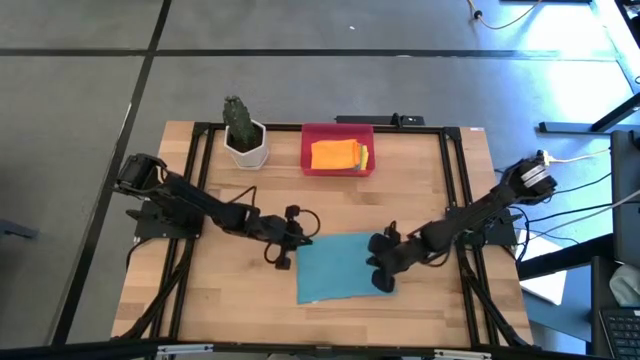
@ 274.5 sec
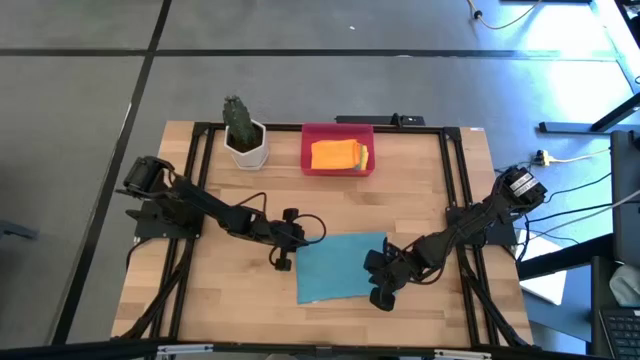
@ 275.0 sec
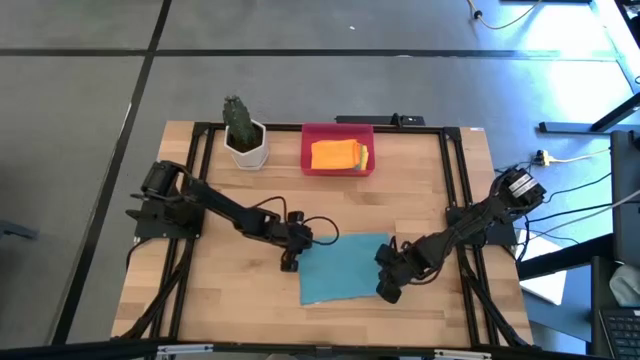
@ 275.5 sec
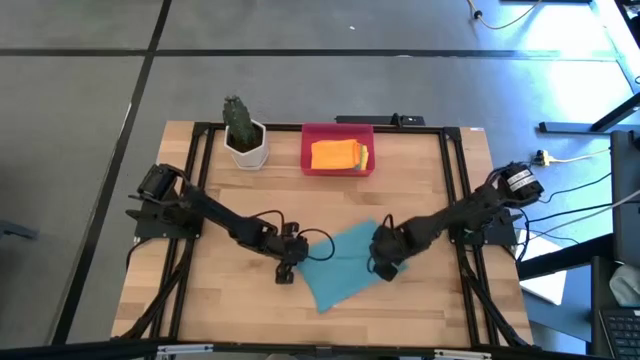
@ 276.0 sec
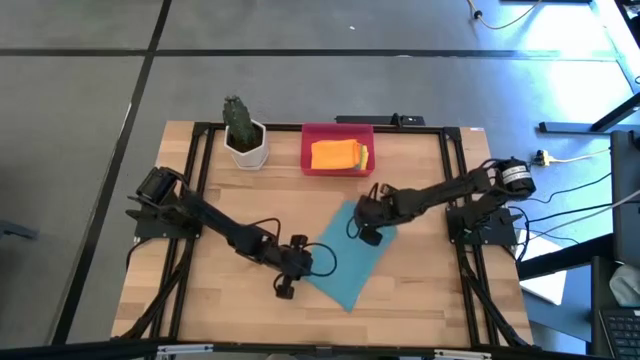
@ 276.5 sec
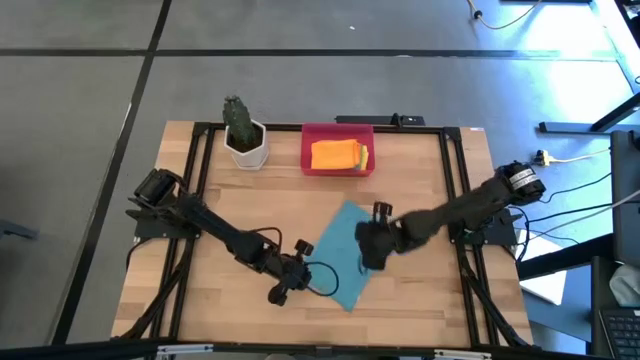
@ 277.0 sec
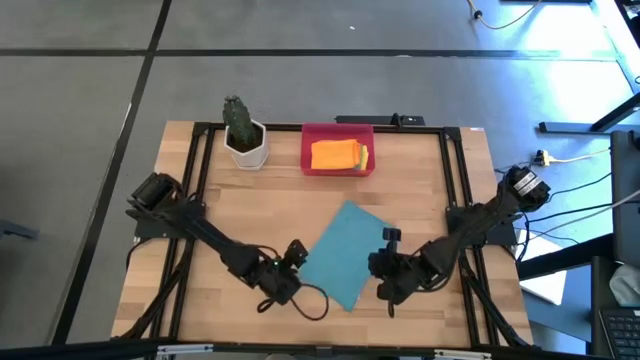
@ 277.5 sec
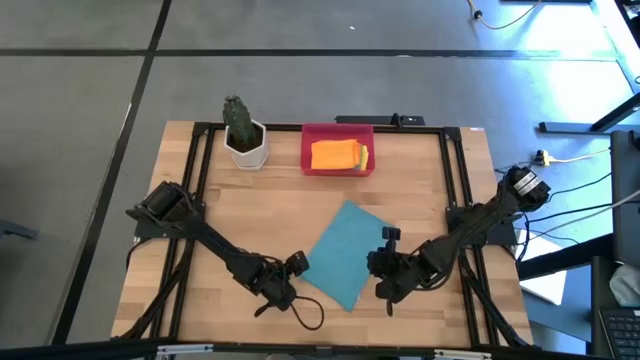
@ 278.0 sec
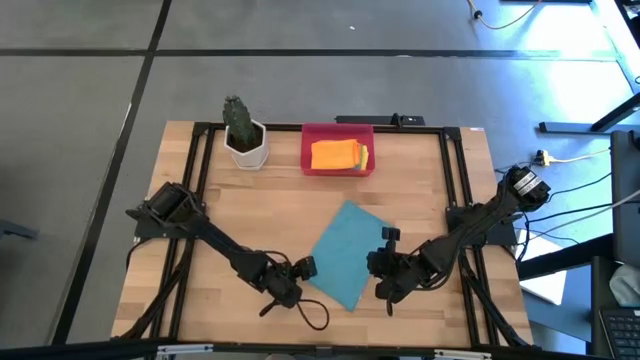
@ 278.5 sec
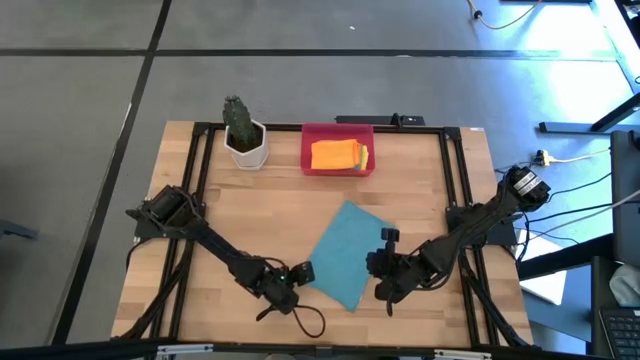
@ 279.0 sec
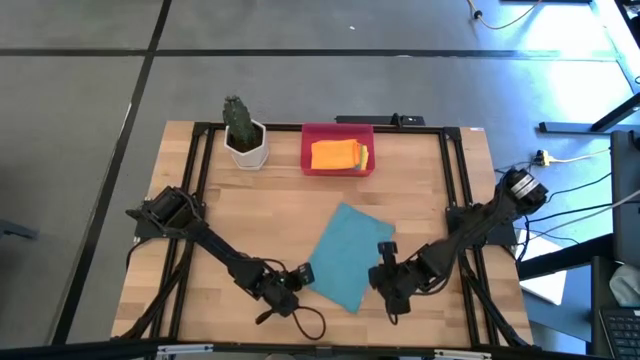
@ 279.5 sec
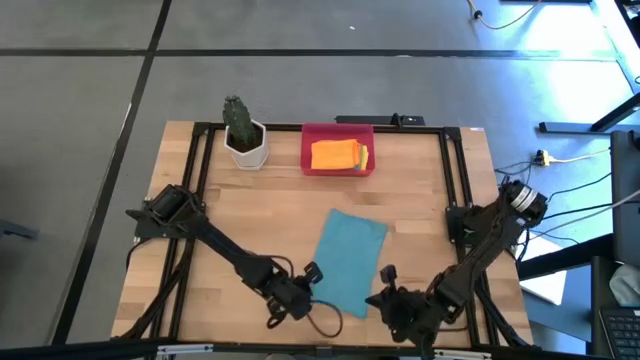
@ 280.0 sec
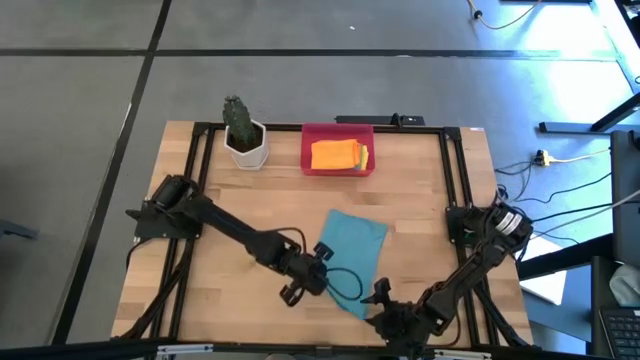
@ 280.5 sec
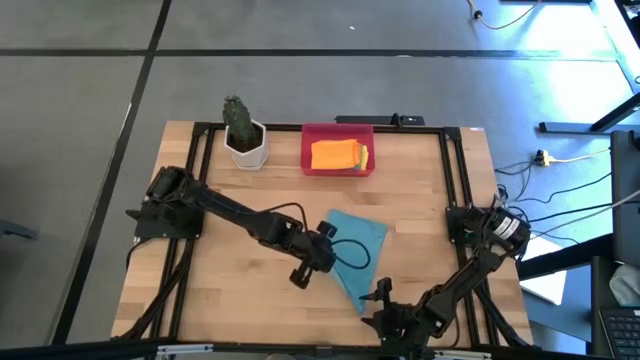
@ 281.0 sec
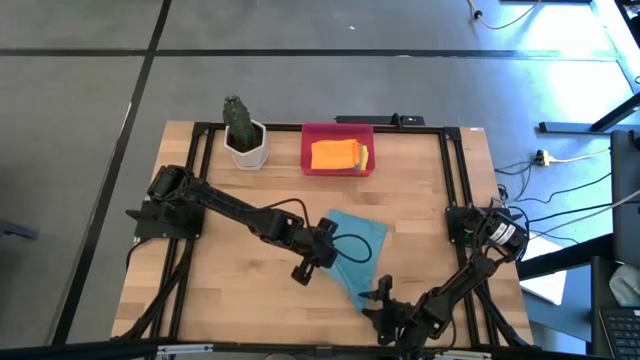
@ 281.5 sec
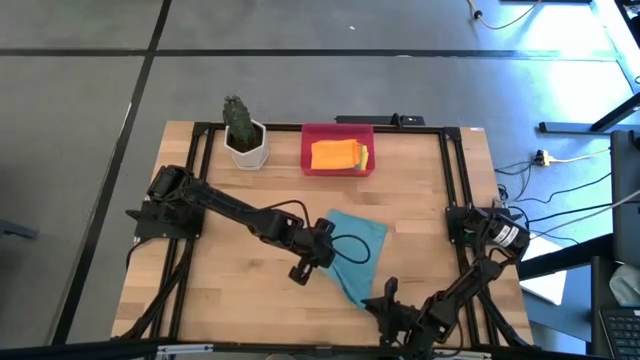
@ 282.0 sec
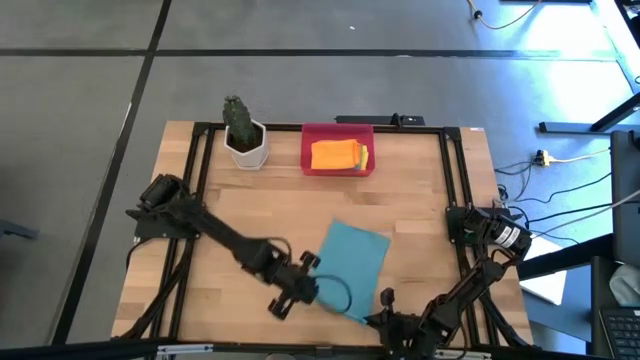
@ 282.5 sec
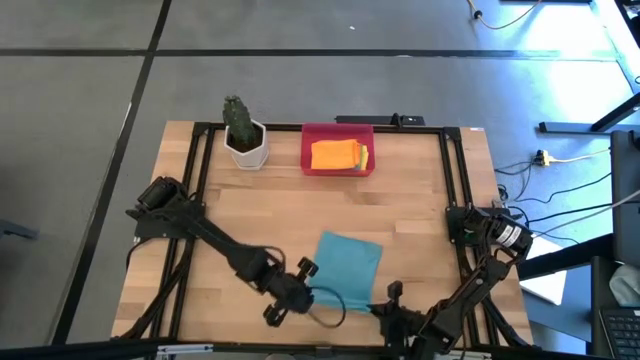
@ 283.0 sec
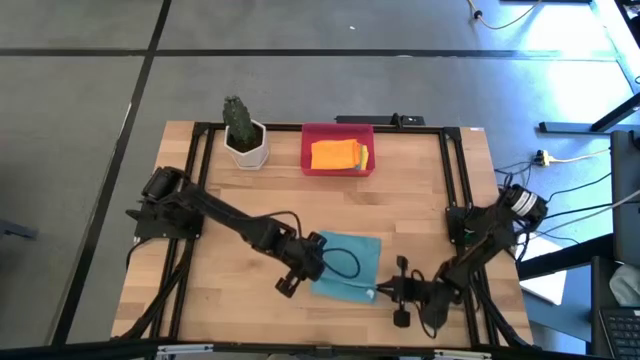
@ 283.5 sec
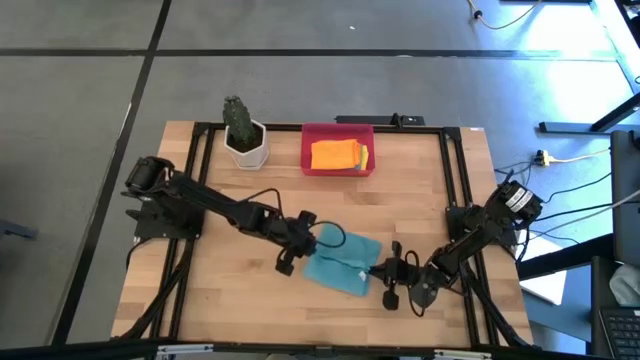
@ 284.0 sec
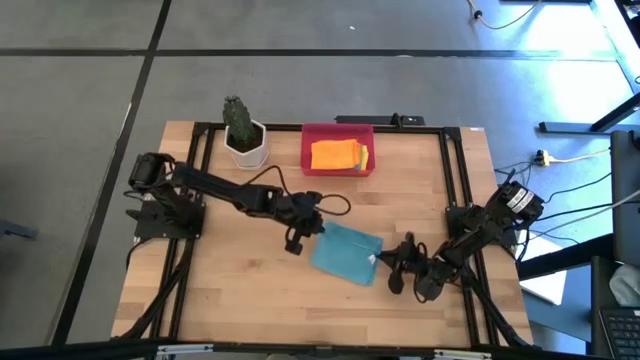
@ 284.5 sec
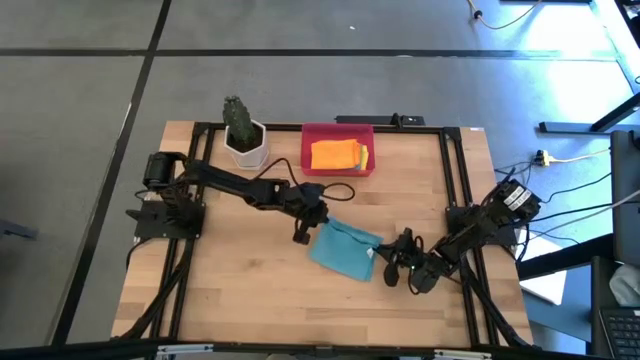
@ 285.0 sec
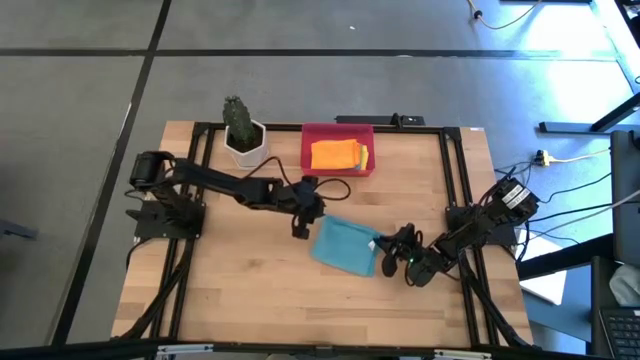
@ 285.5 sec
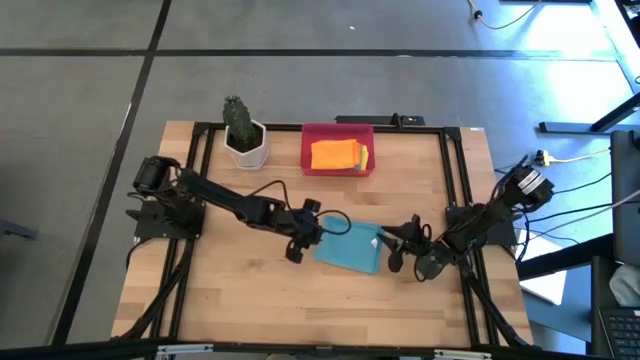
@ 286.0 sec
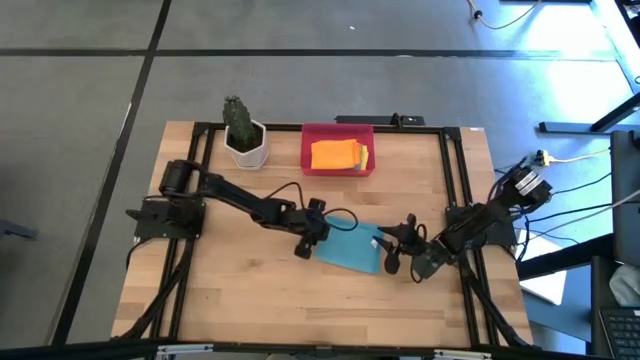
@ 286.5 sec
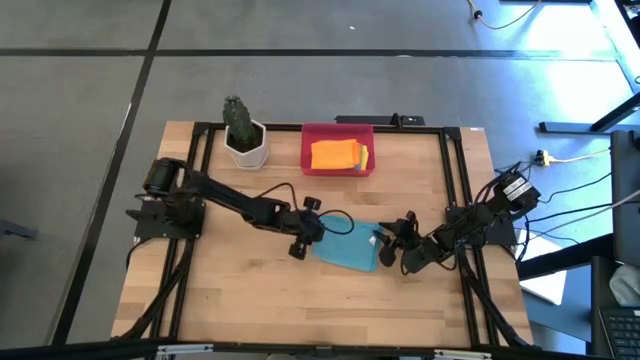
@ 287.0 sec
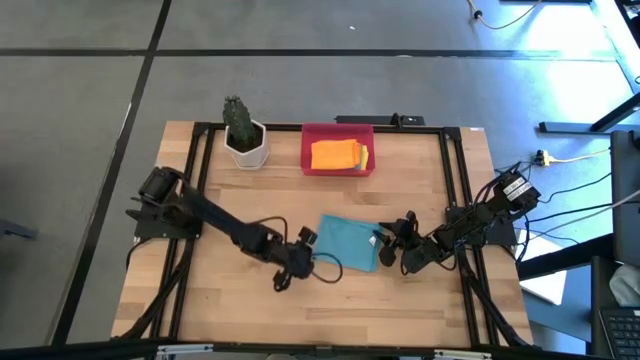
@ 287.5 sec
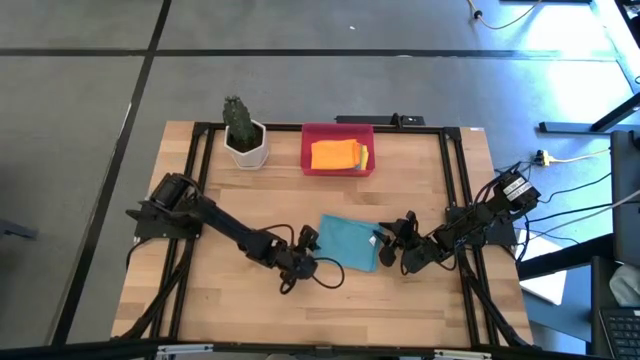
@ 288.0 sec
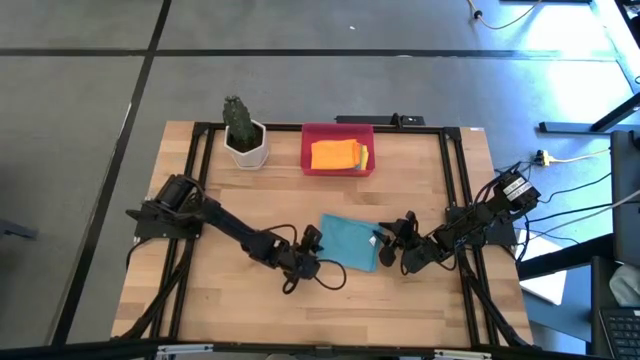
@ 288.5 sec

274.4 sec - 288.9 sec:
Task: Fold microfiber towels
Fold the blue microfiber cloth

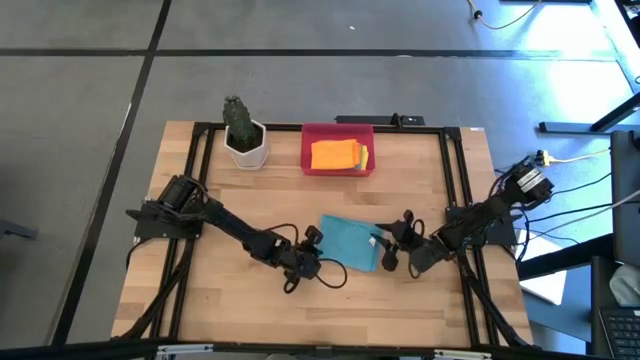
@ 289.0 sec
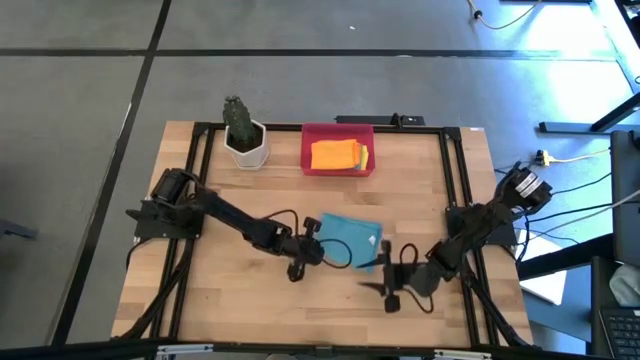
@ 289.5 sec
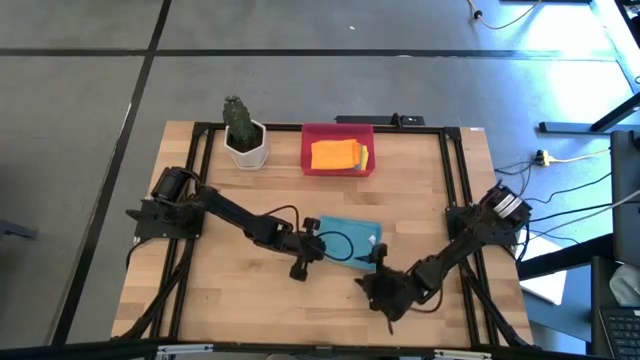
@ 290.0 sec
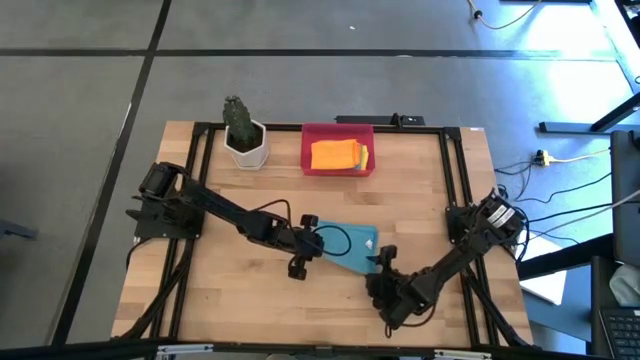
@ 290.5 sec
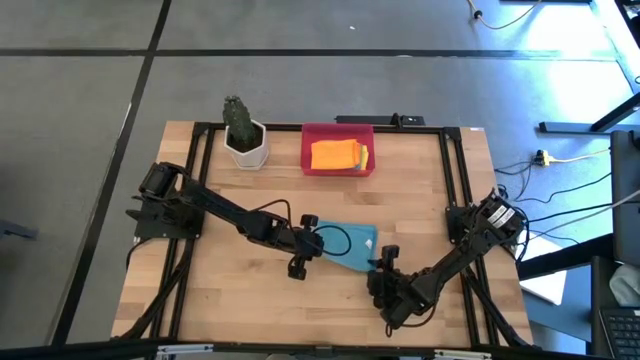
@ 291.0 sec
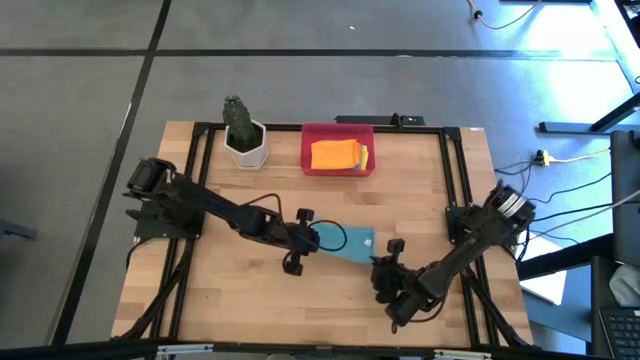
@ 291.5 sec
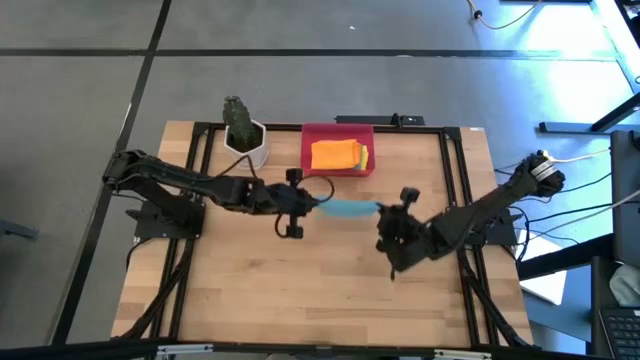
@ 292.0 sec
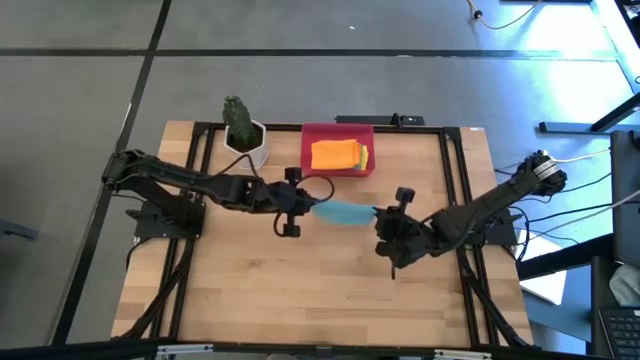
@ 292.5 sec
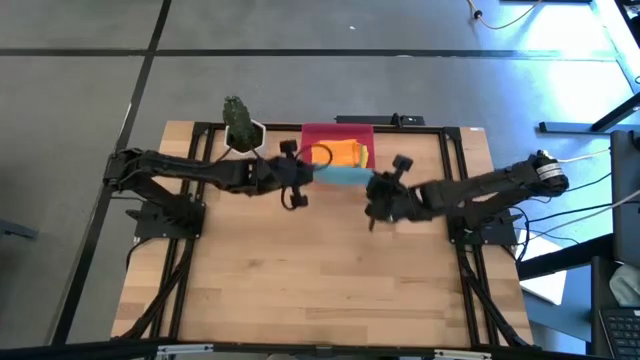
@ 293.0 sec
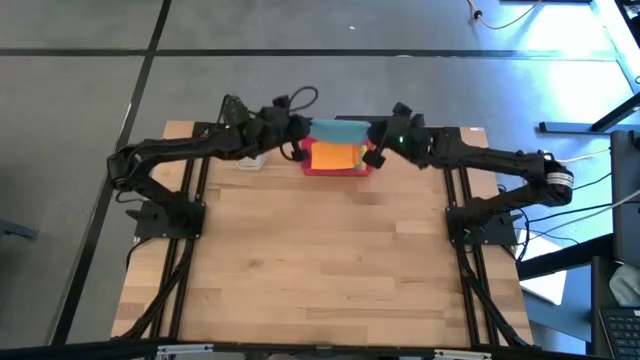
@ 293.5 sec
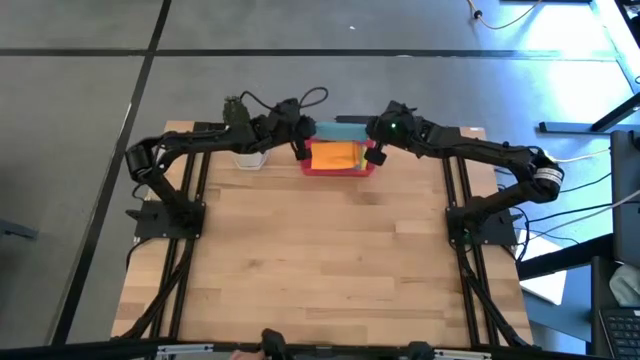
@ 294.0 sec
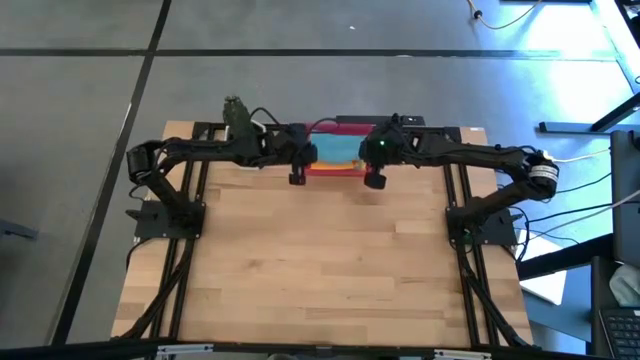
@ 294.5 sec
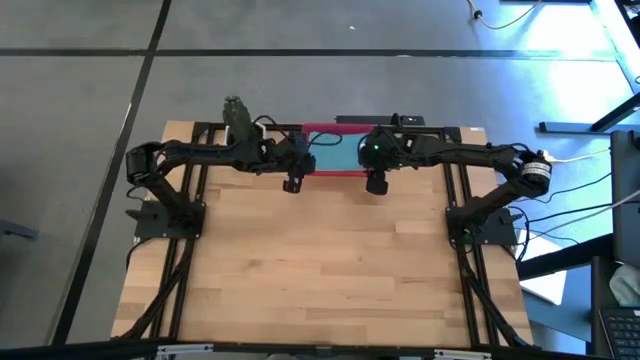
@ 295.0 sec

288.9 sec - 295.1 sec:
Put the blue microfiber cloth into the red bin
